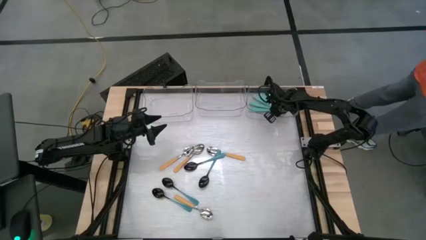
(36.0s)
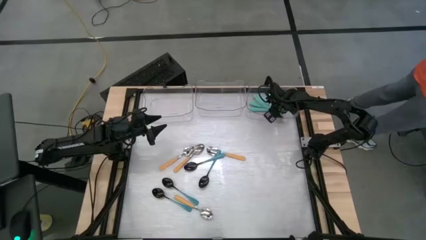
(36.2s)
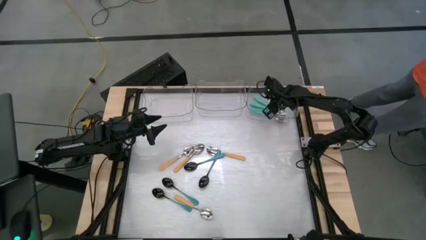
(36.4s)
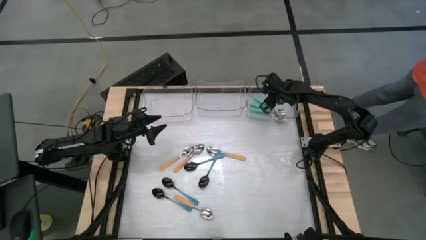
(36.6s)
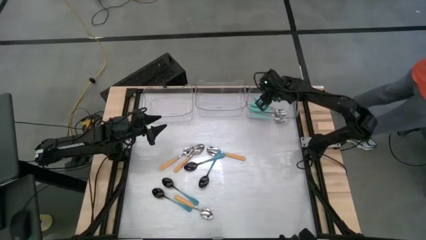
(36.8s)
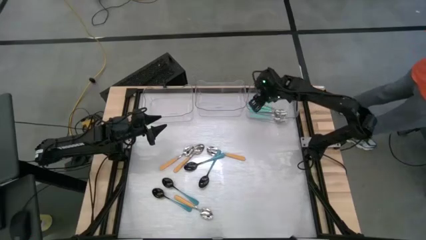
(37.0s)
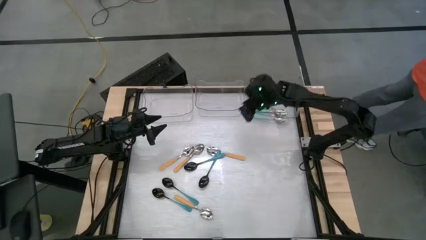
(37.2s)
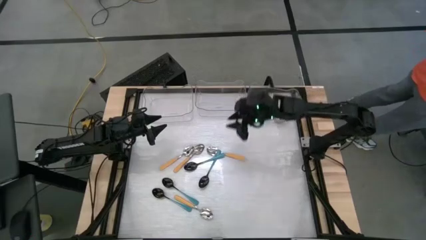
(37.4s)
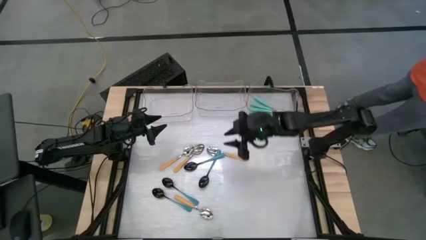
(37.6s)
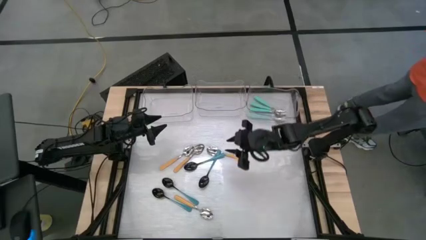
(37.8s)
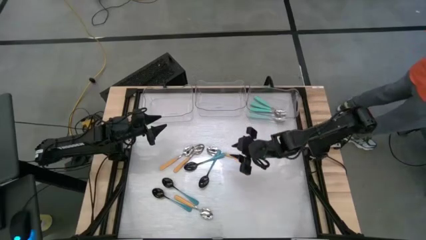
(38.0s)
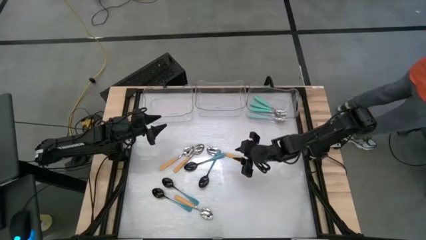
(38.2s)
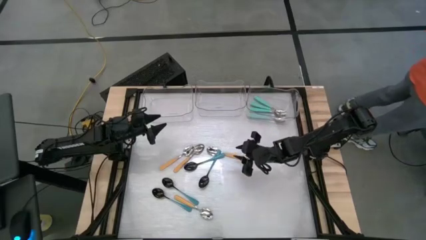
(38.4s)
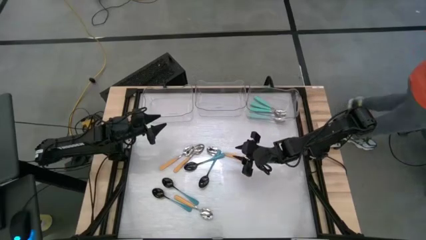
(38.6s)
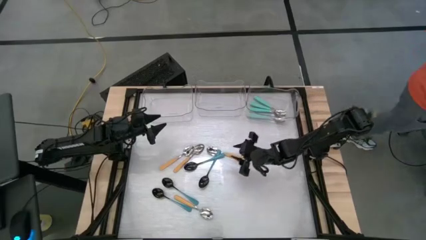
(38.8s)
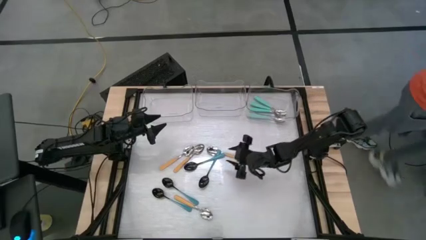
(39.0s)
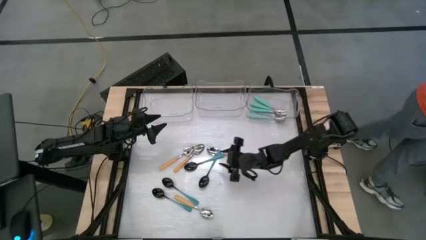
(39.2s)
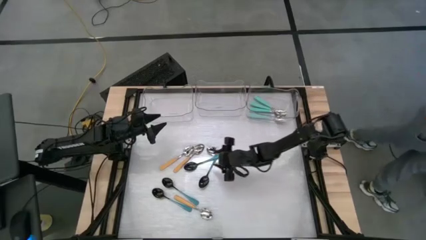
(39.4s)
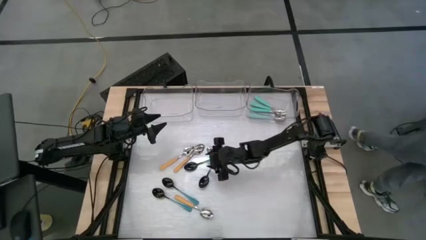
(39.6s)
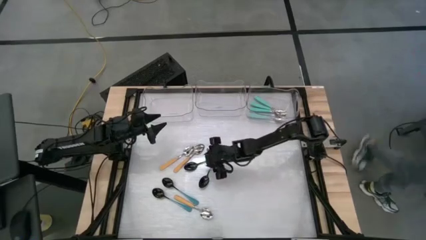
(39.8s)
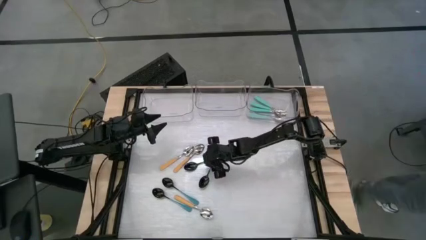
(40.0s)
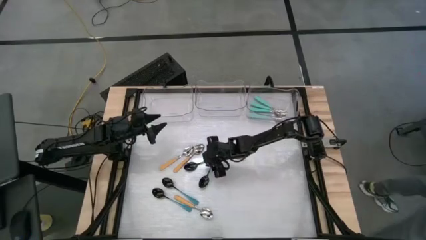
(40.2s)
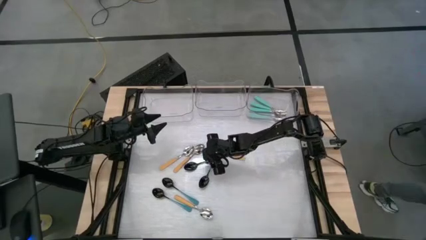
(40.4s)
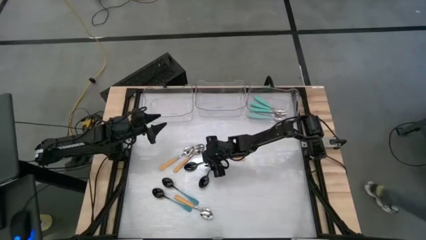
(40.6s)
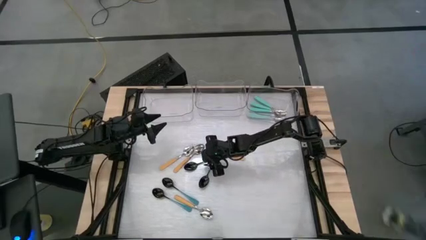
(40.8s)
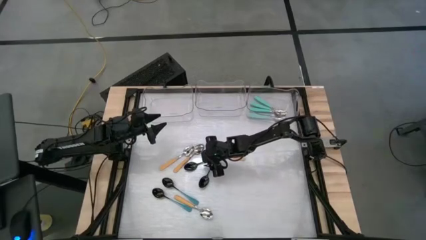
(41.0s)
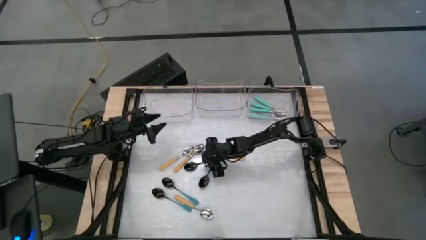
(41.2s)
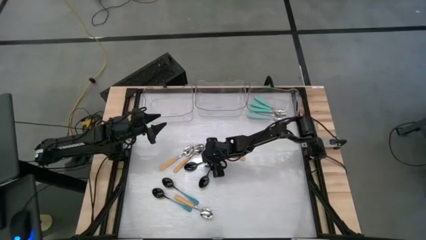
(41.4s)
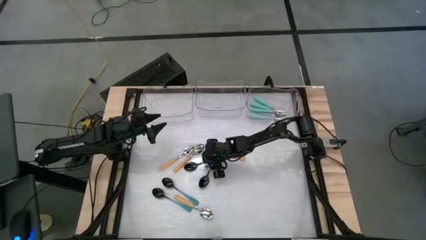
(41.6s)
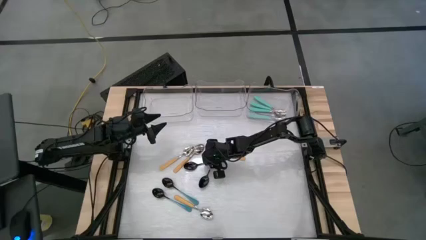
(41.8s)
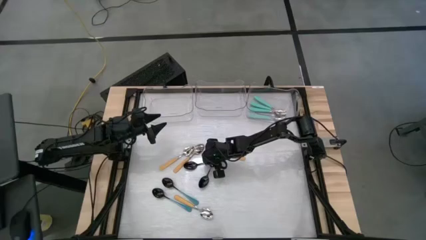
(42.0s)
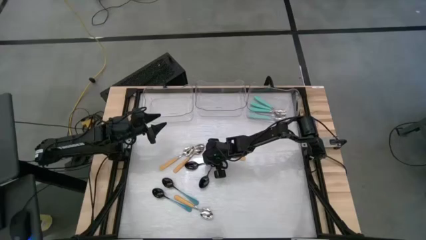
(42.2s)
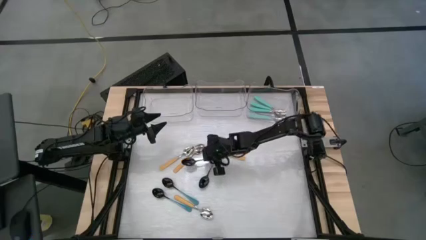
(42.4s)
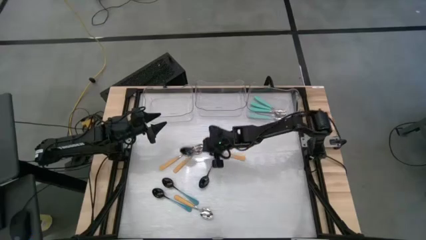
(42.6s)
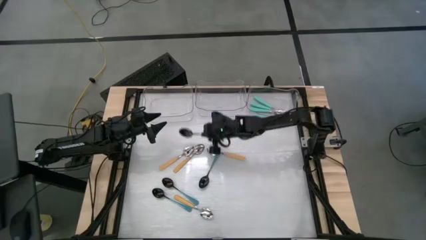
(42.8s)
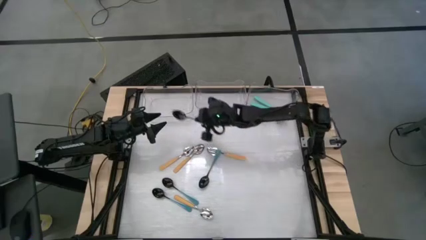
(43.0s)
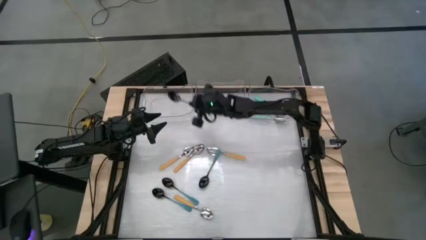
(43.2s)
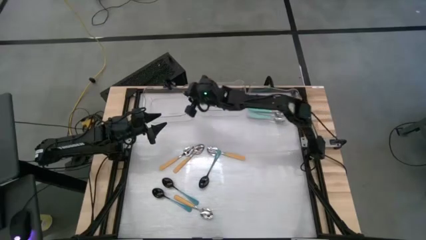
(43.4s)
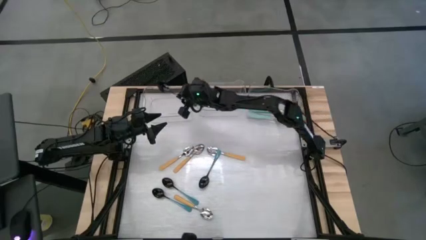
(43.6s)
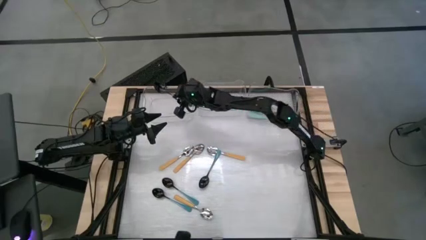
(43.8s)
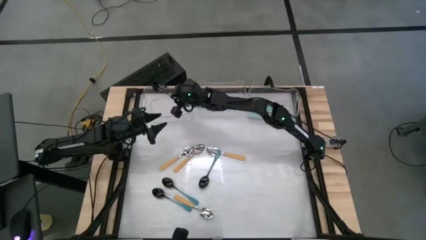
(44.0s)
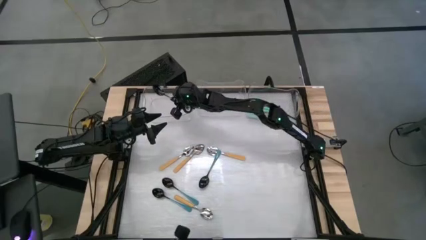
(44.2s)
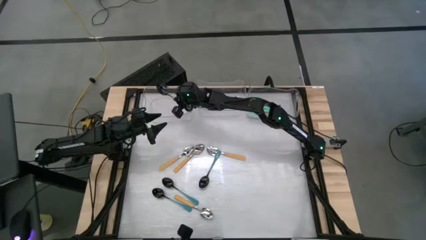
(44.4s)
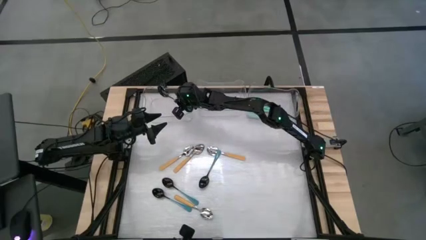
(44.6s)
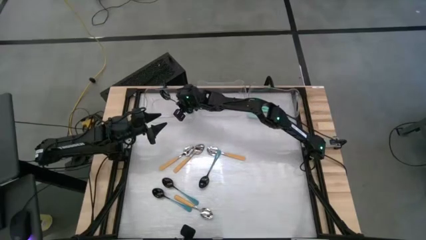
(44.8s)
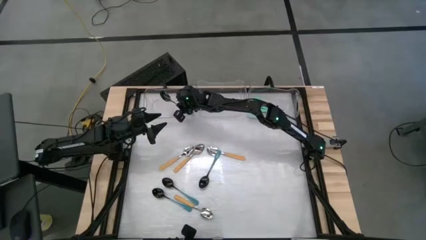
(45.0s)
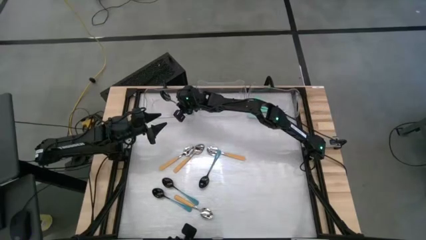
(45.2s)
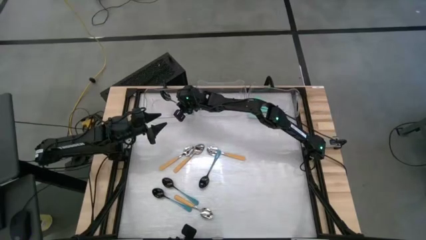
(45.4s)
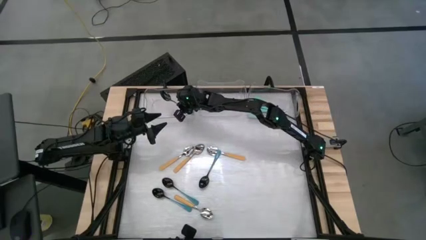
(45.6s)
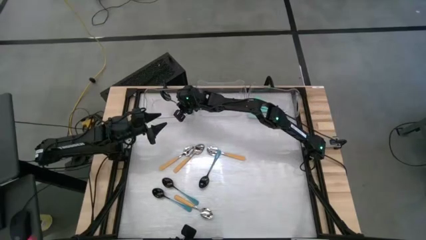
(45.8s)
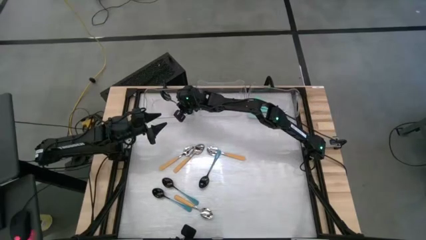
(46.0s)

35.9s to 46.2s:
Task: Sort silverware by color (type)
Put the top center blue spoon into the top left transparent bin

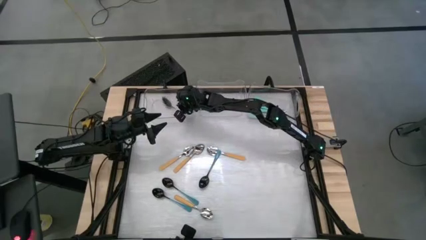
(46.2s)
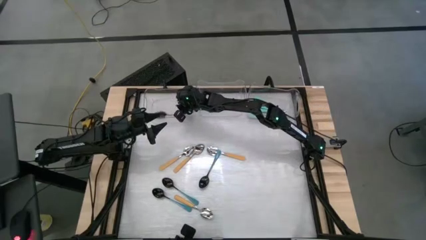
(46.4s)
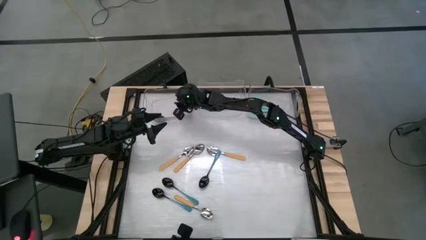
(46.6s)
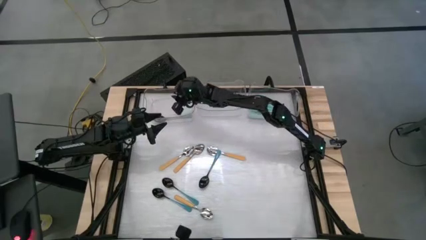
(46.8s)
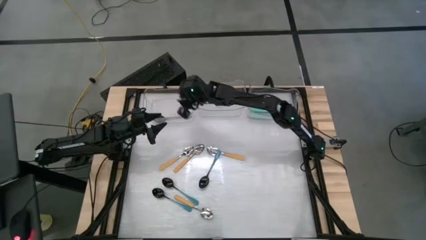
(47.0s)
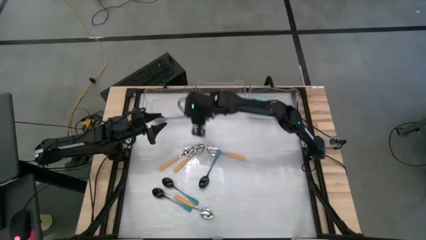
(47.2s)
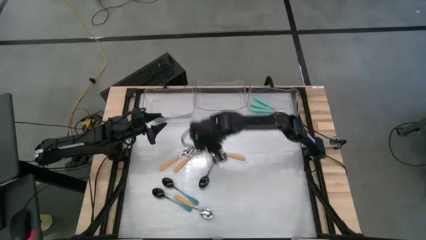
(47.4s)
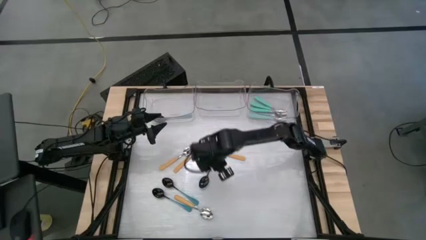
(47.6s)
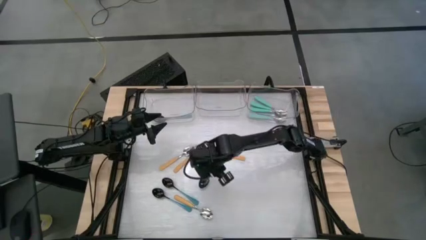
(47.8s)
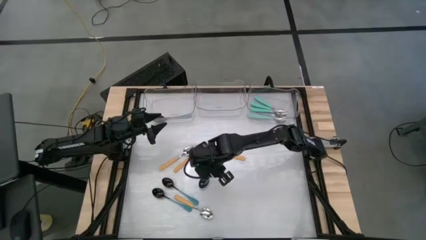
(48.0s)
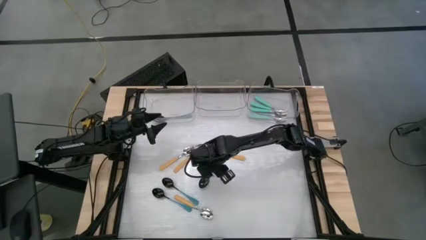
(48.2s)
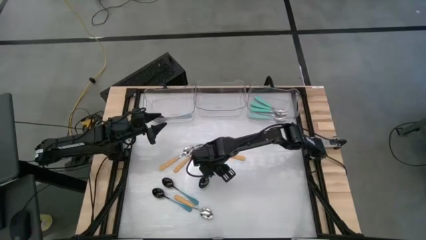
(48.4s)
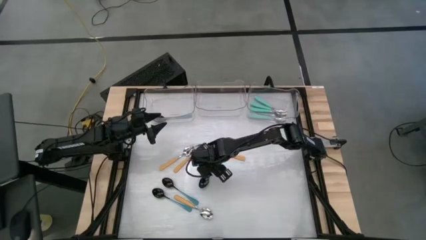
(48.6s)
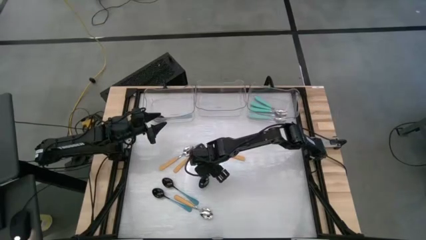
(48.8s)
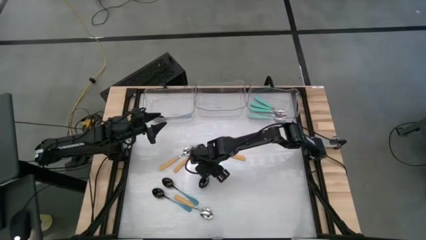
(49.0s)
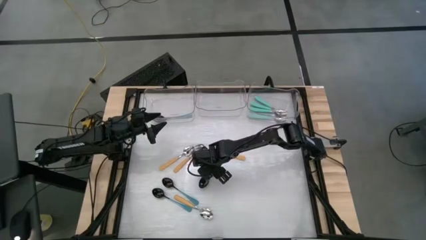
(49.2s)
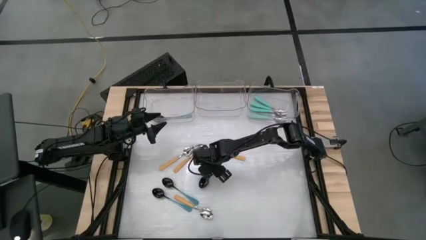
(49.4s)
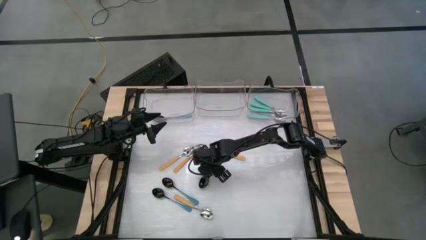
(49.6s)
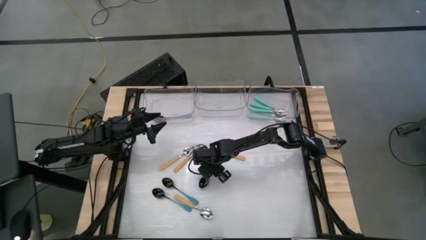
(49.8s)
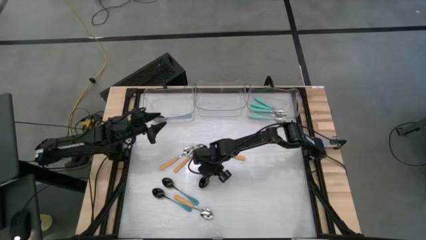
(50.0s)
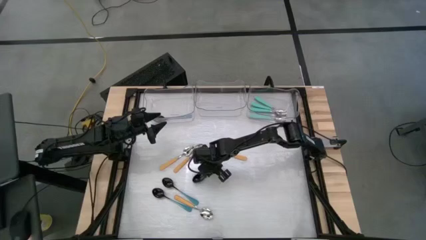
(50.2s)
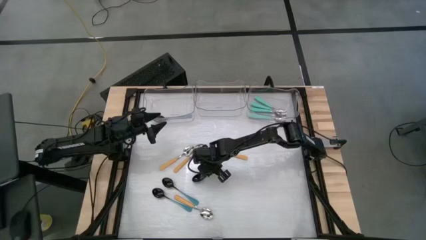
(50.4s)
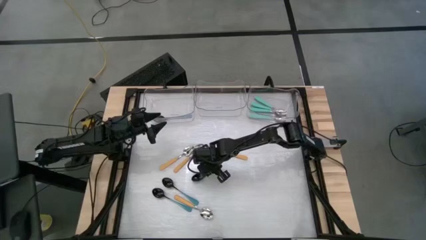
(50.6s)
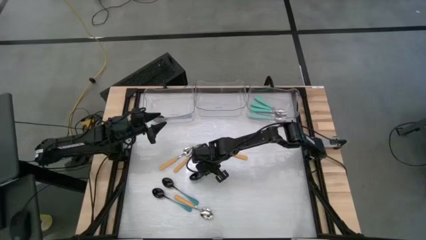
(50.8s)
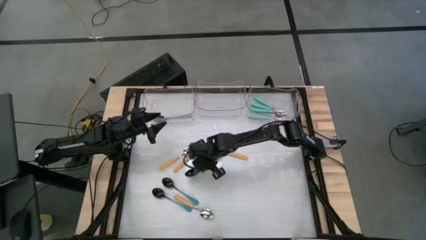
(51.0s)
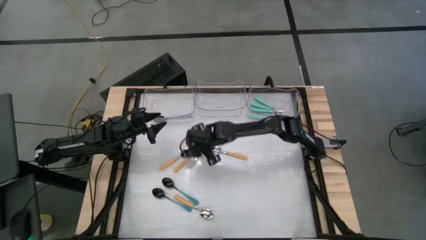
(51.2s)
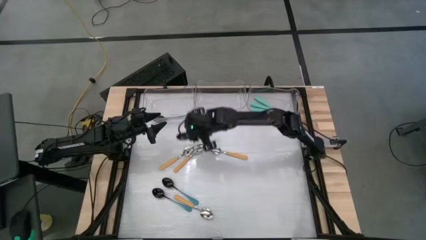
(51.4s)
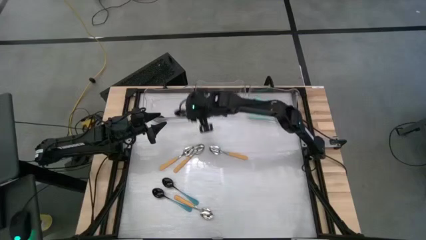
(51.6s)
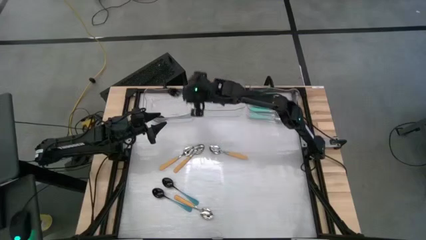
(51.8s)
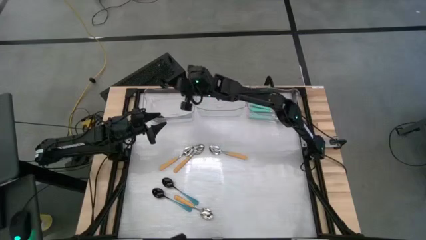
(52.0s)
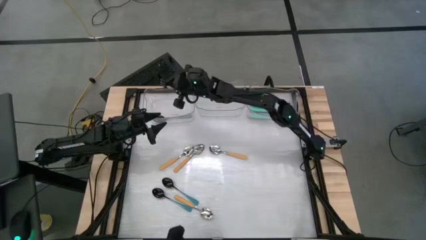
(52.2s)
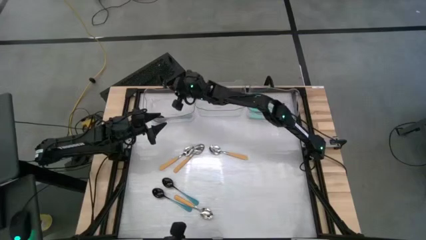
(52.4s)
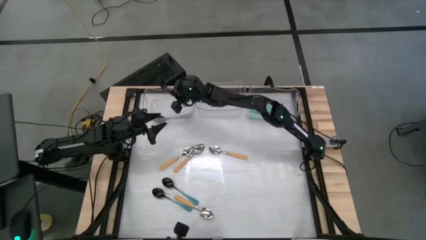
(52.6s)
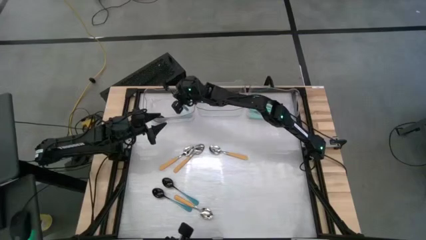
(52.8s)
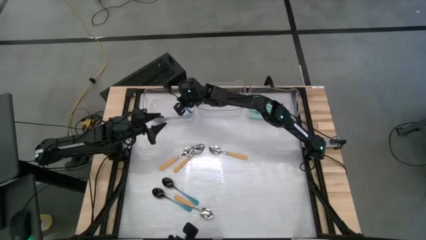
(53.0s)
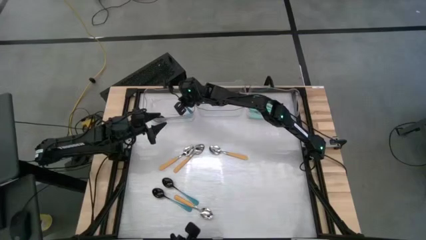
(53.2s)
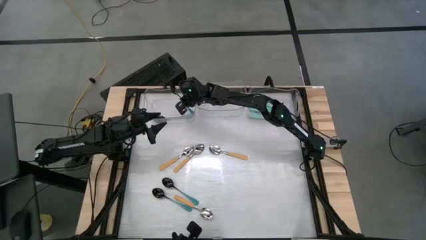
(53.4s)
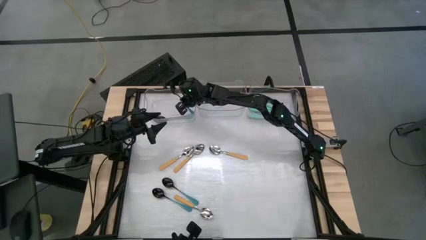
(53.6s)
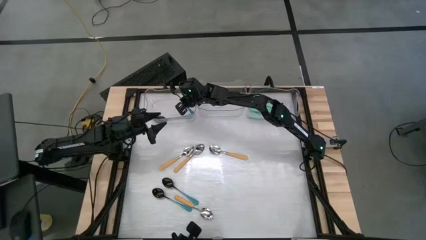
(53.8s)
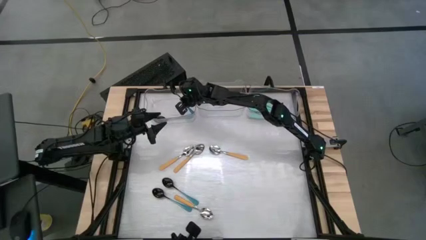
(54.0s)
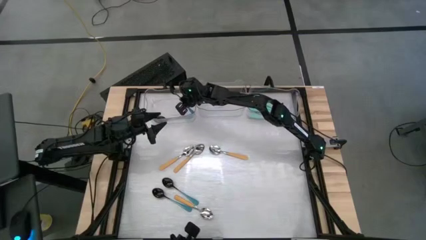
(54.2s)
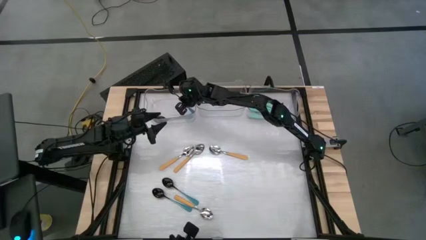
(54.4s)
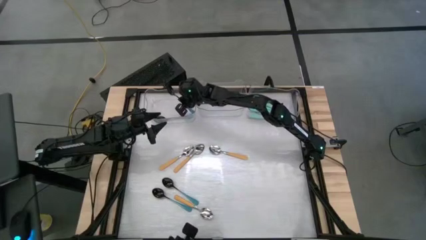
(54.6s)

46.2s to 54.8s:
Put the center blue spoon into the top left transparent bin
